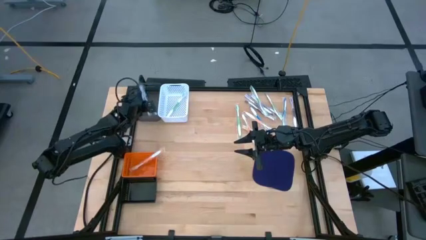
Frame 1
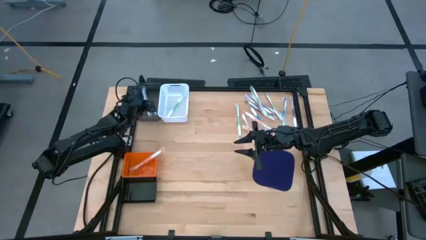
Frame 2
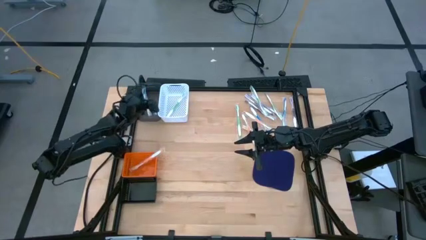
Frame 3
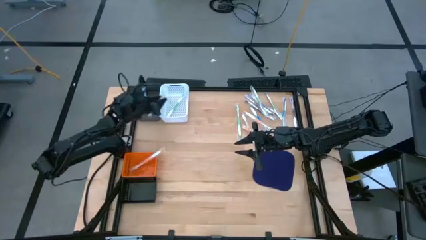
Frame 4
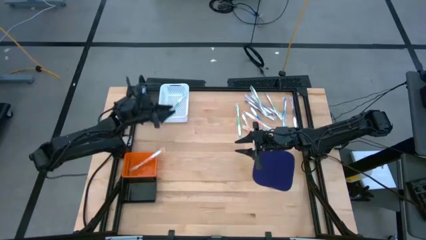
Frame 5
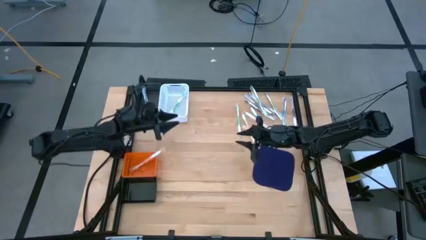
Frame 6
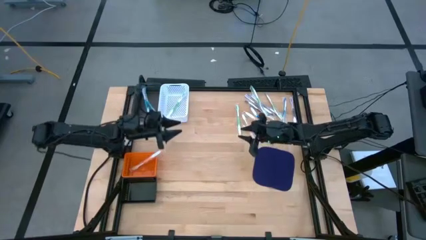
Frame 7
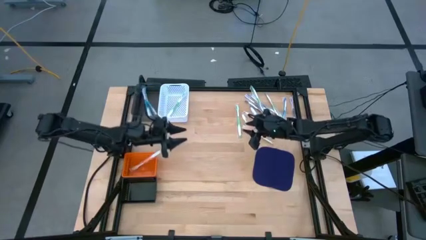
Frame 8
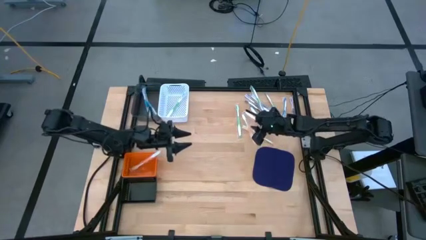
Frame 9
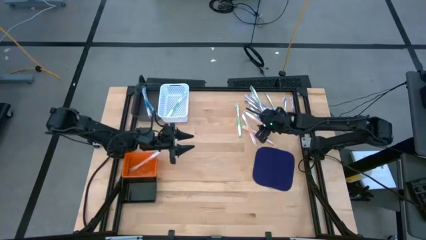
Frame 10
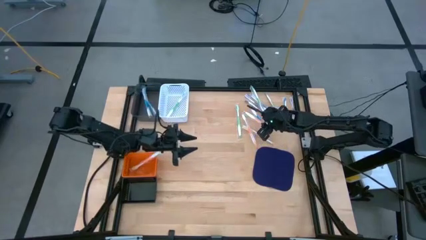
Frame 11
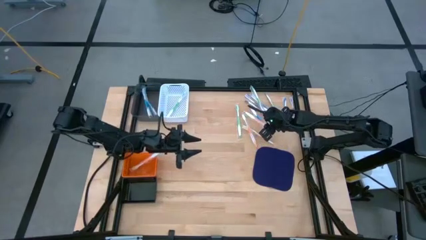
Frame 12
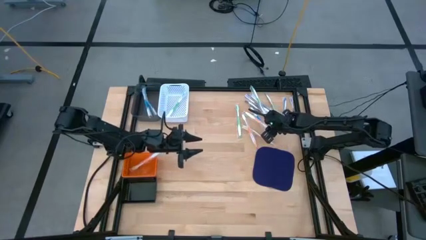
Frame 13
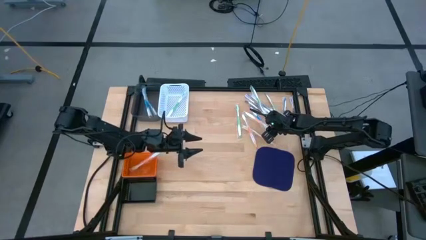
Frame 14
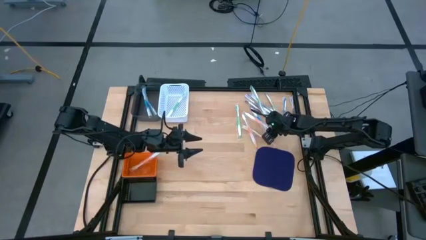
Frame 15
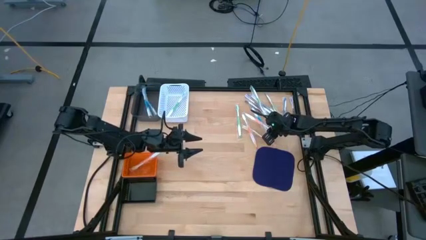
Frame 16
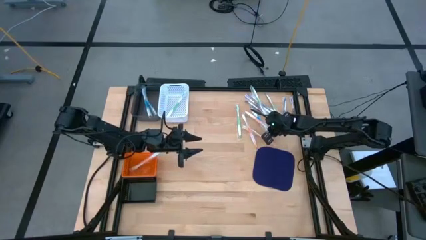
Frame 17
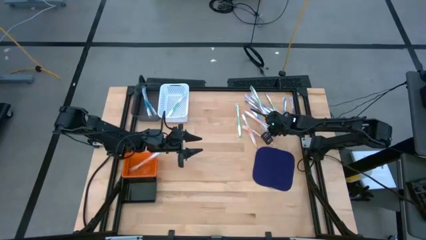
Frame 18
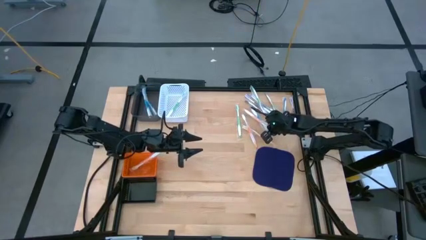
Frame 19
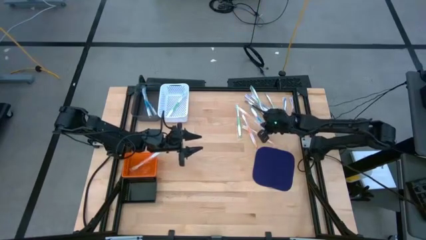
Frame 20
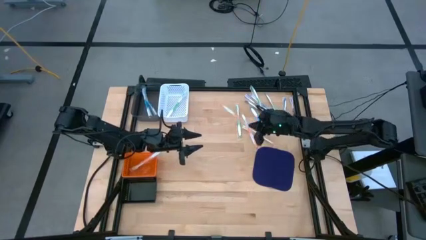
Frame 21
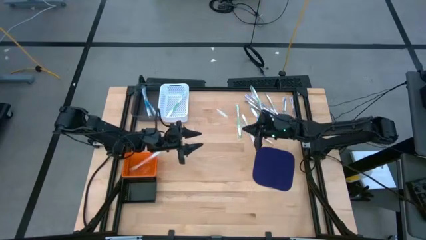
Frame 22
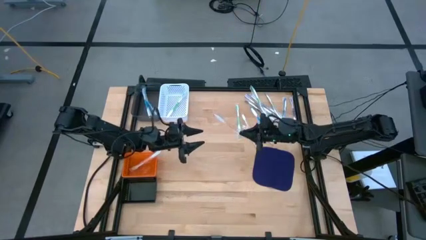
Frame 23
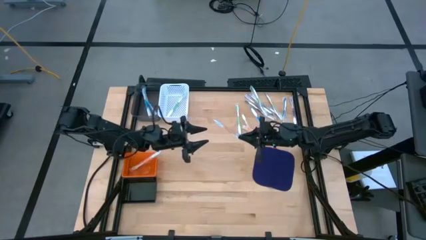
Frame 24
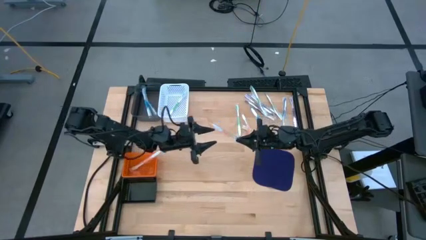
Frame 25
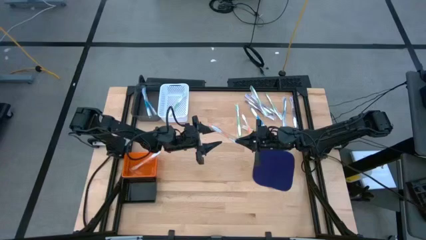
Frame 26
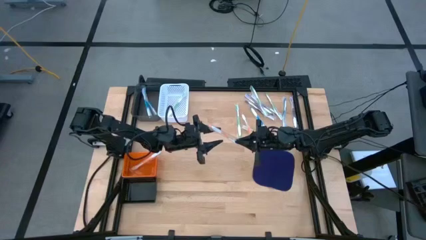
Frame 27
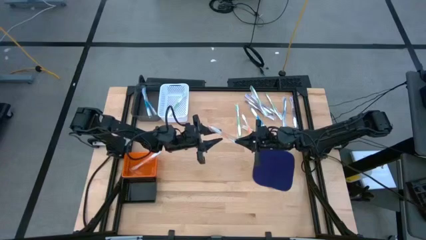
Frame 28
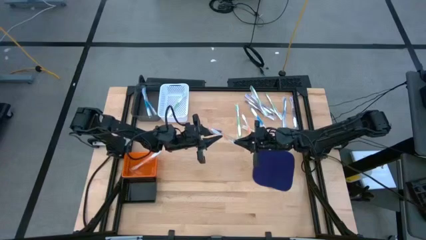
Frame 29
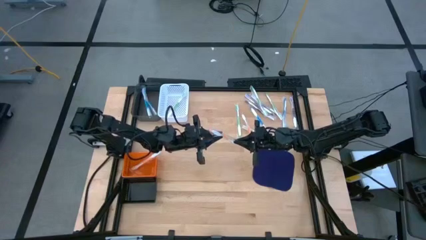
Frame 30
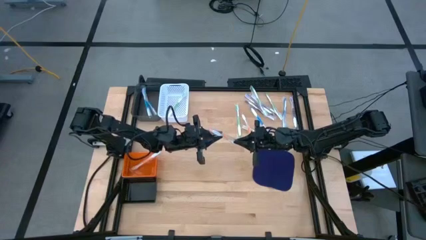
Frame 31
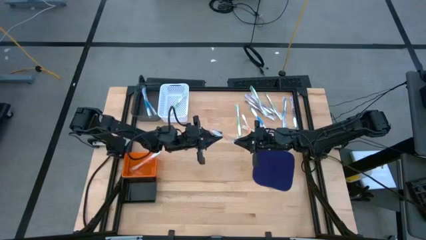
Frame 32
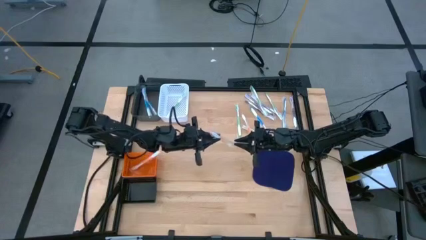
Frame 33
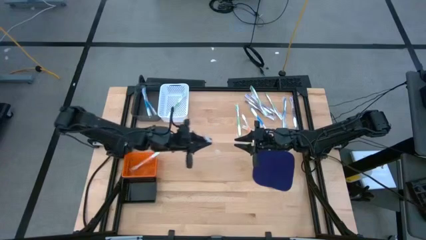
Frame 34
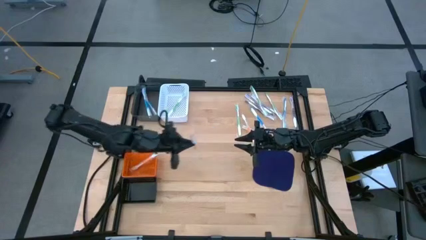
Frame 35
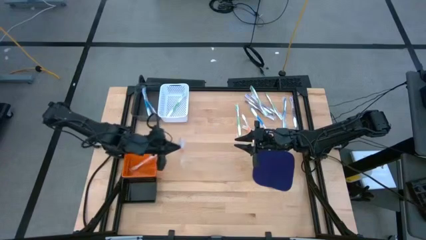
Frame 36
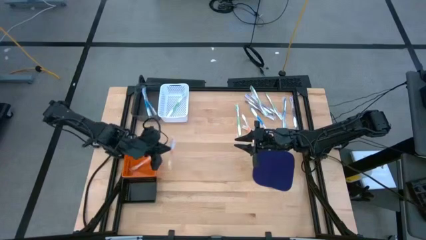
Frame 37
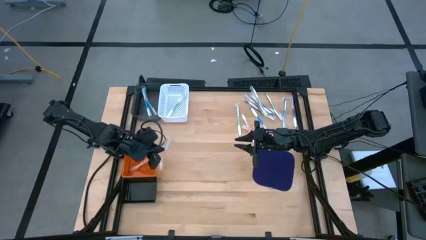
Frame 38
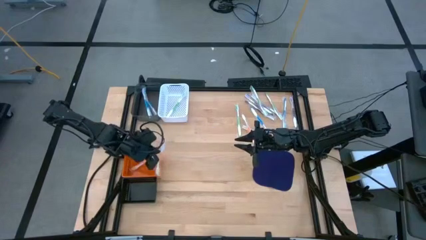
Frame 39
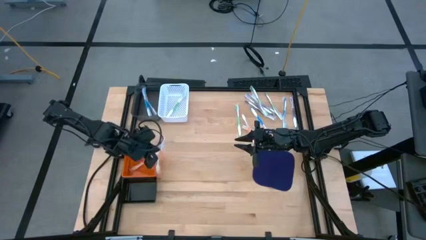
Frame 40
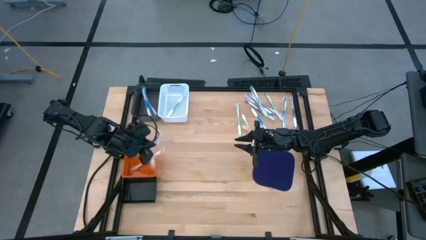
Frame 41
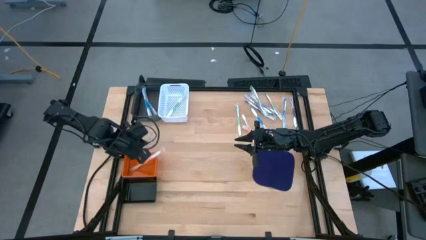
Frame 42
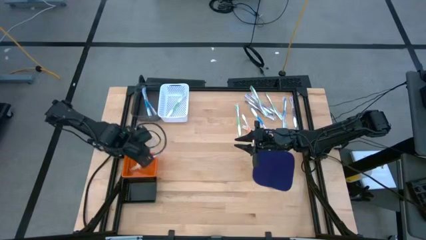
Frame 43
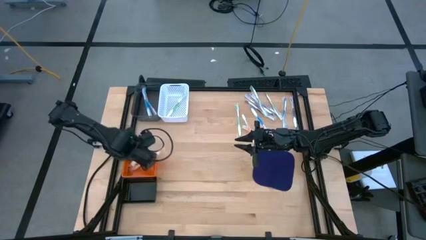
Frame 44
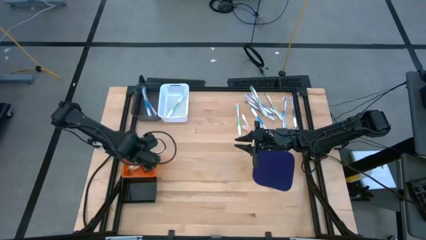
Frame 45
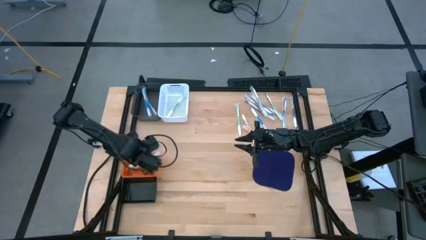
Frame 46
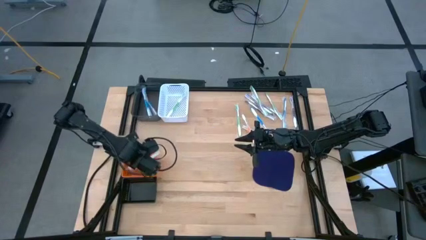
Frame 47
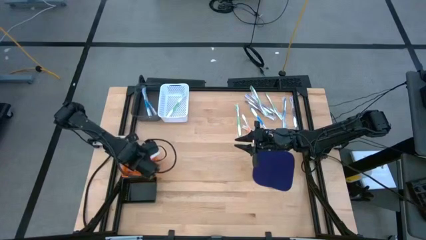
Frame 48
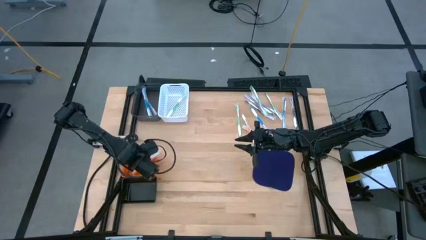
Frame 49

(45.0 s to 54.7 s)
Task: Pick & Place Toothbrushes
Put the orange toothbrush into the orange bin

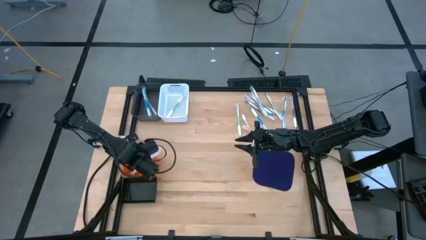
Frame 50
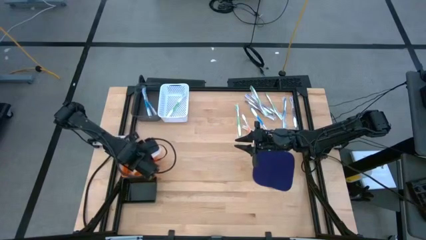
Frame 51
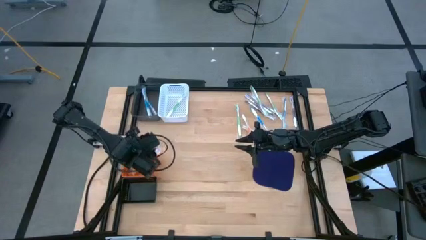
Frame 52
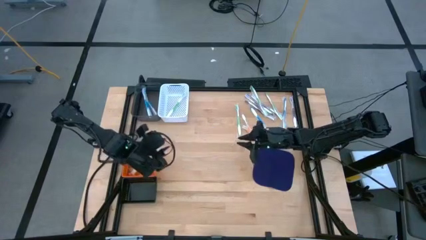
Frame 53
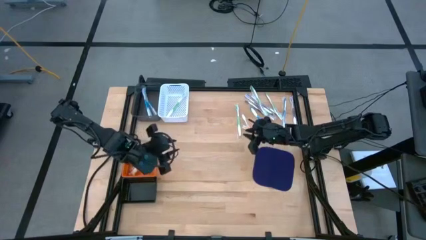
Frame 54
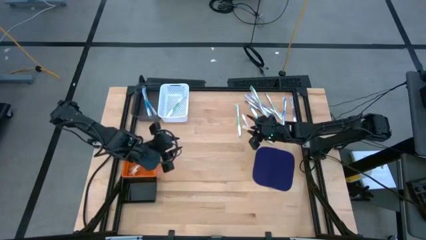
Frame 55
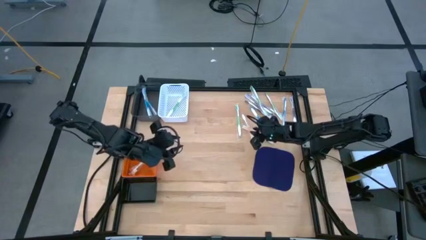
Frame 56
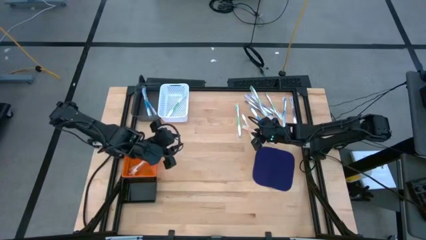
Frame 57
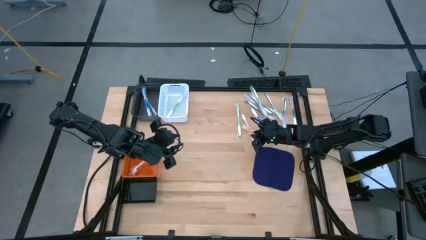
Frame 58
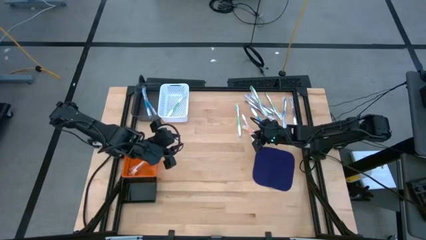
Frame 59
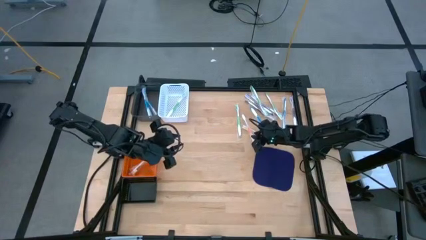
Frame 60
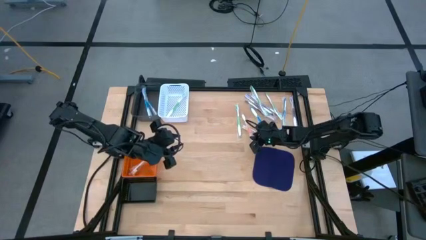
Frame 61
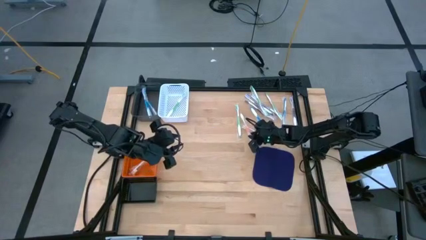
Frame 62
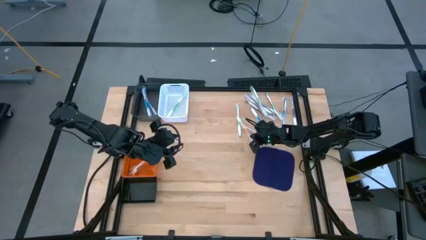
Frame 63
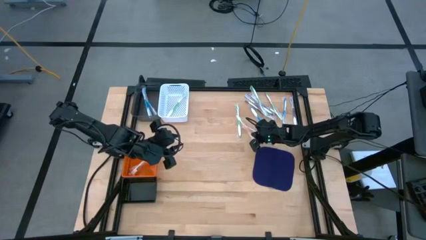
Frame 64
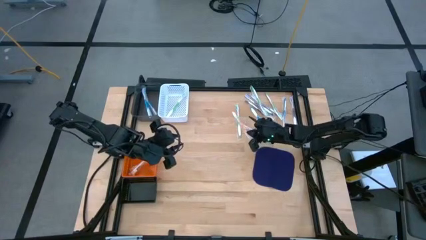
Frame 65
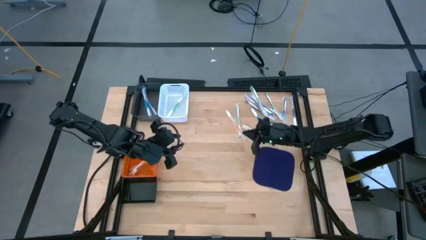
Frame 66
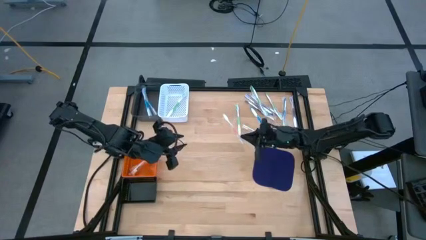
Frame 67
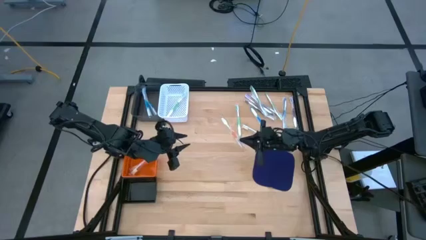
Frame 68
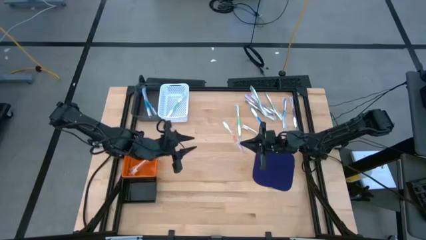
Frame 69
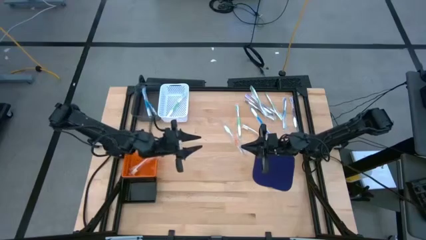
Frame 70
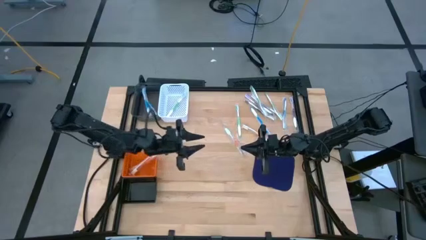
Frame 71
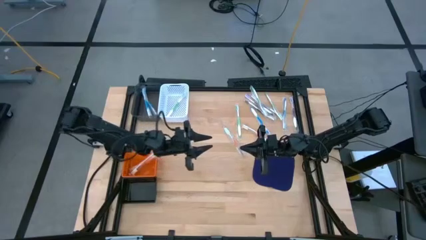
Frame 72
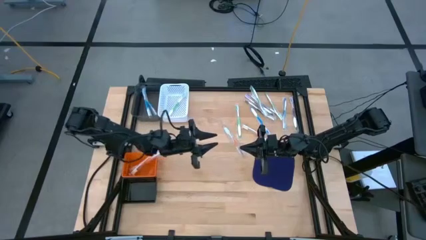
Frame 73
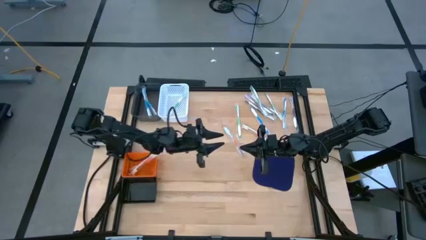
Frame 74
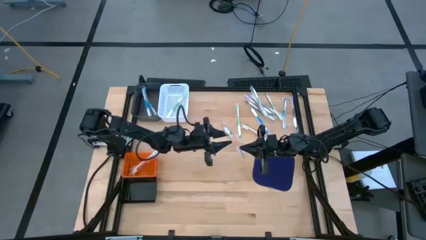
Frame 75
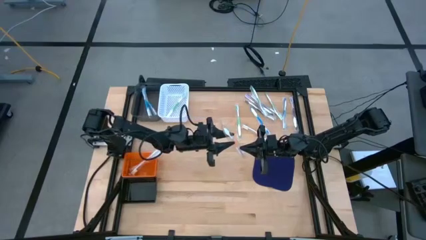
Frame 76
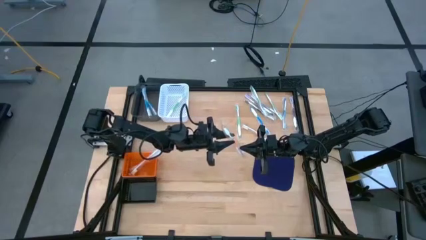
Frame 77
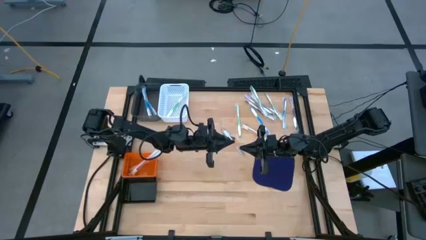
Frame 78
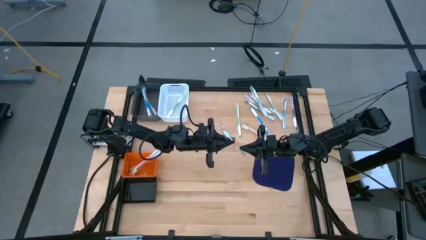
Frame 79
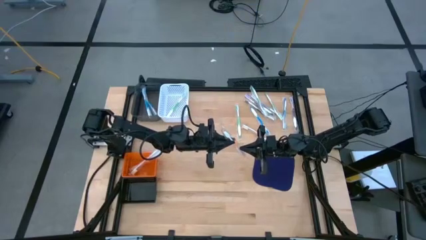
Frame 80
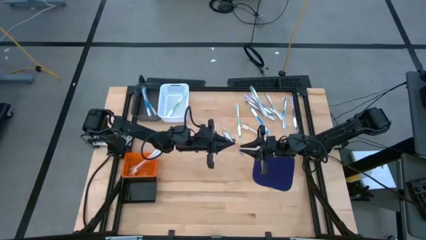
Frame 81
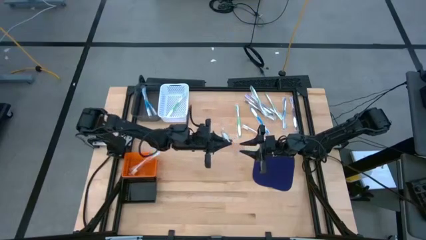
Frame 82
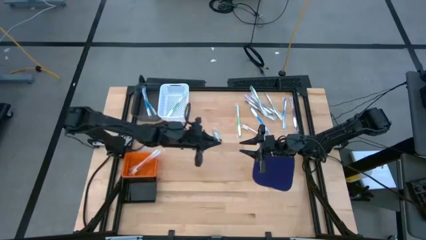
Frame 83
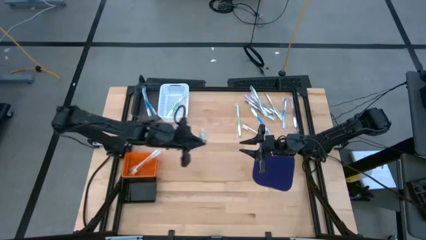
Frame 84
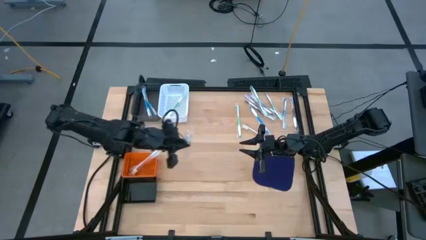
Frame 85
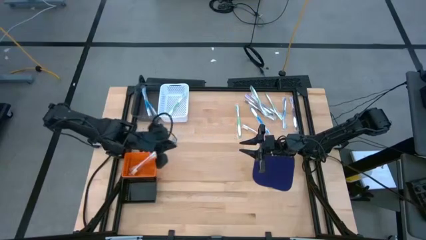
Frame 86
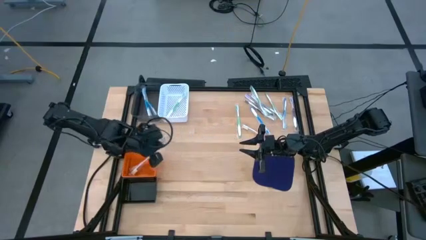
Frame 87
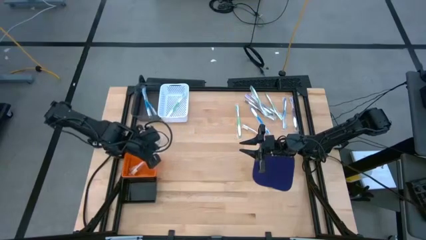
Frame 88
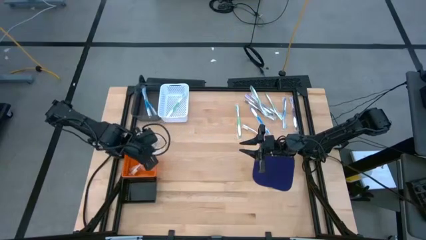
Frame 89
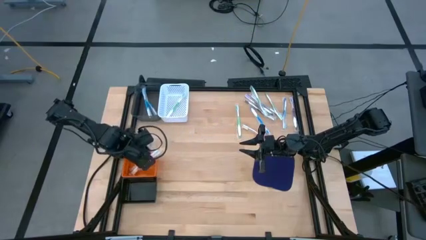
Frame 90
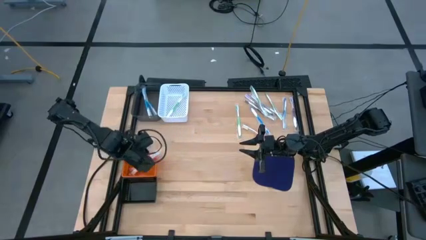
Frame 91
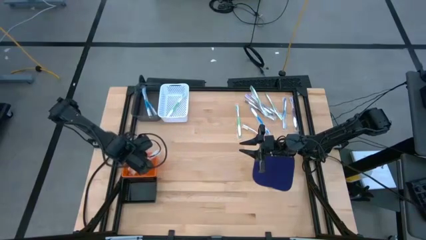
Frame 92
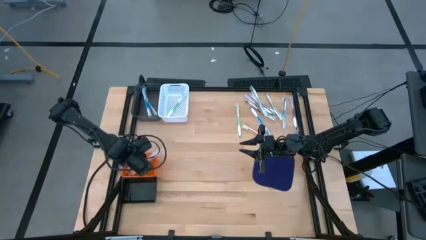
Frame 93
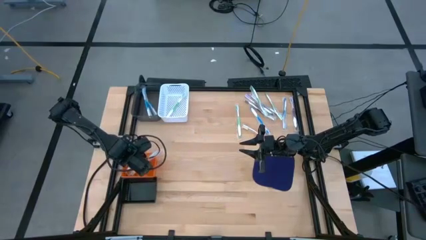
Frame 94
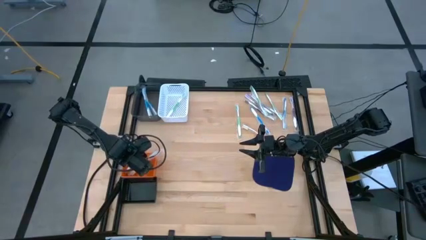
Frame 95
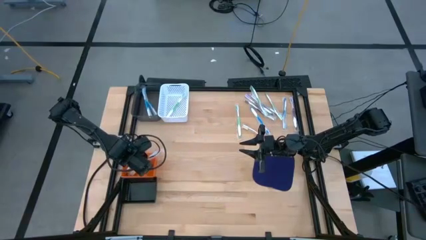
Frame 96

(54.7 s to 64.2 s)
Put the orange toothbrush into the orange bin
